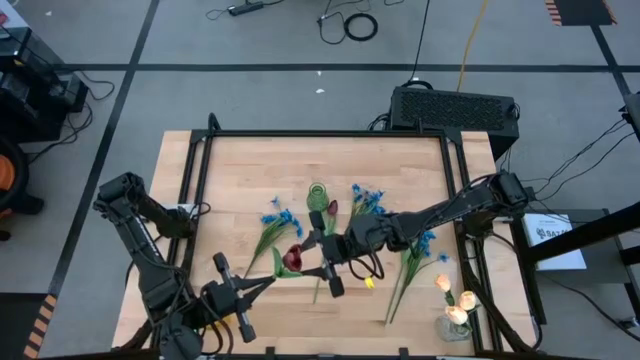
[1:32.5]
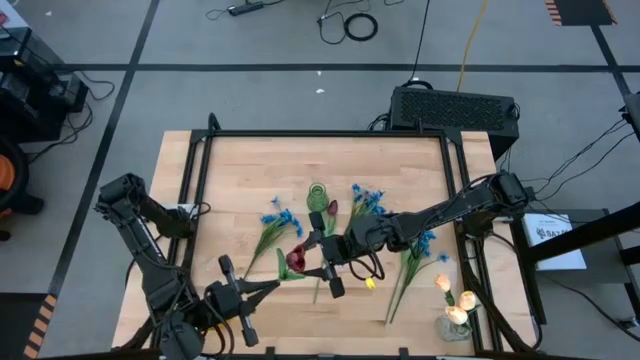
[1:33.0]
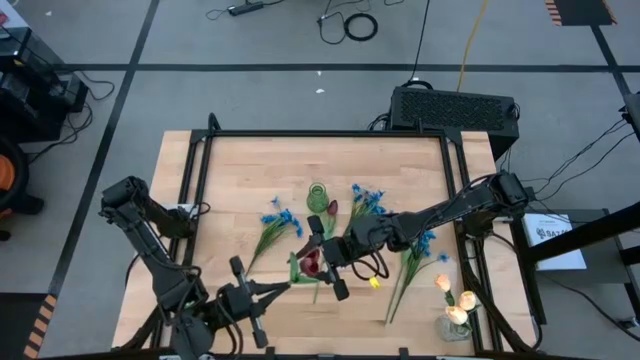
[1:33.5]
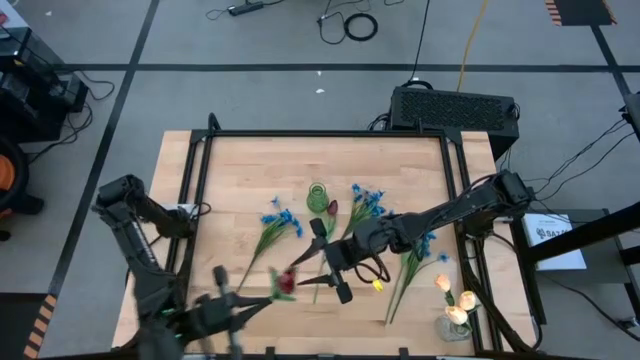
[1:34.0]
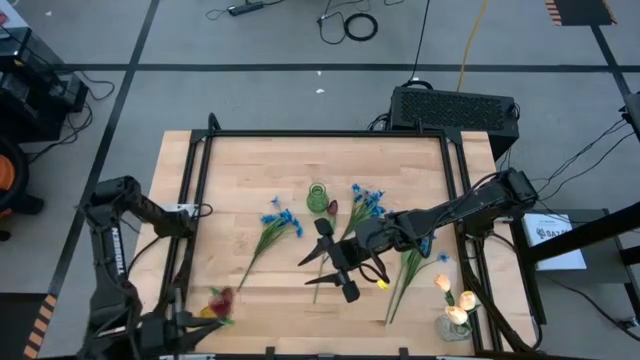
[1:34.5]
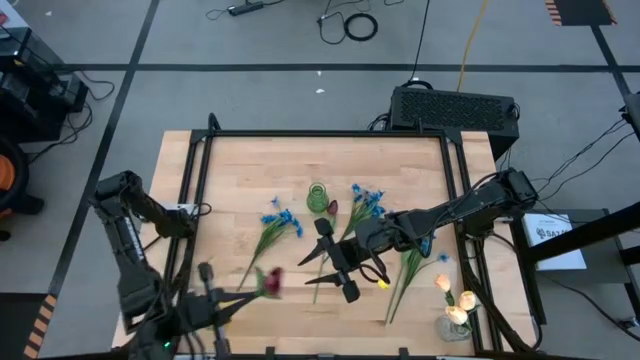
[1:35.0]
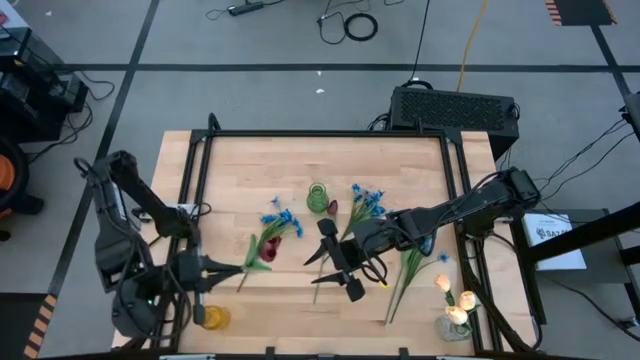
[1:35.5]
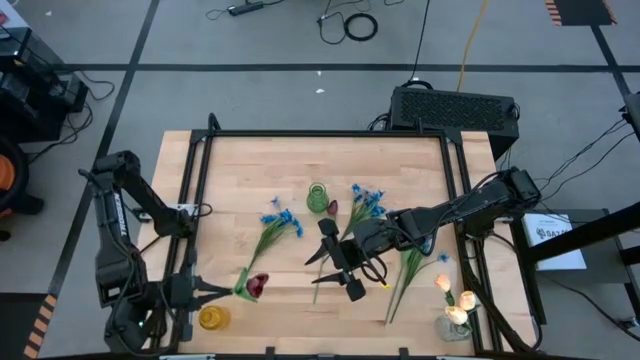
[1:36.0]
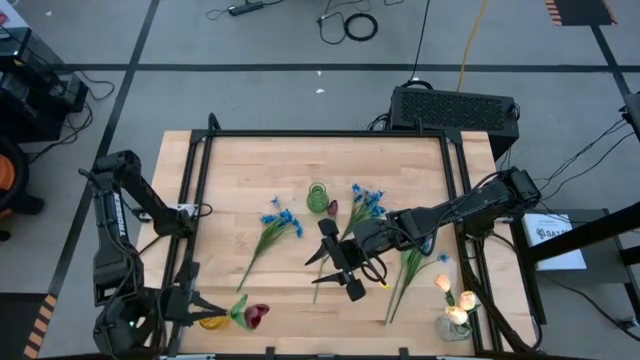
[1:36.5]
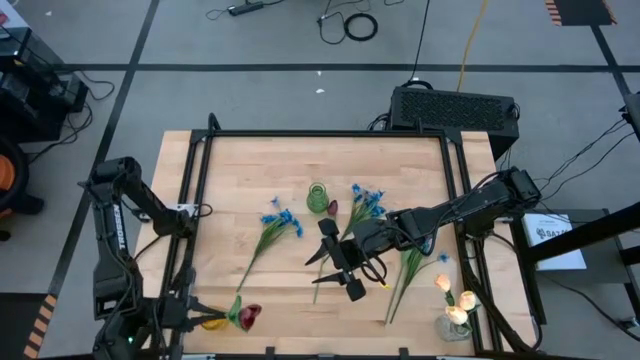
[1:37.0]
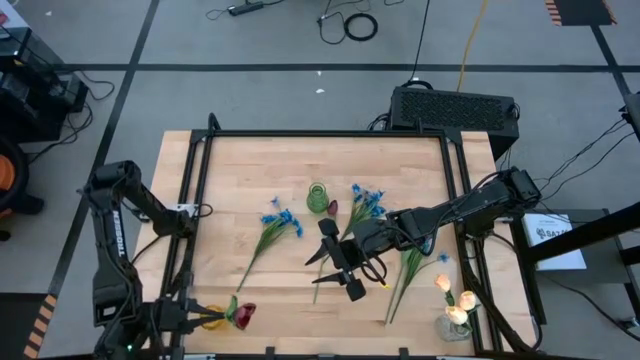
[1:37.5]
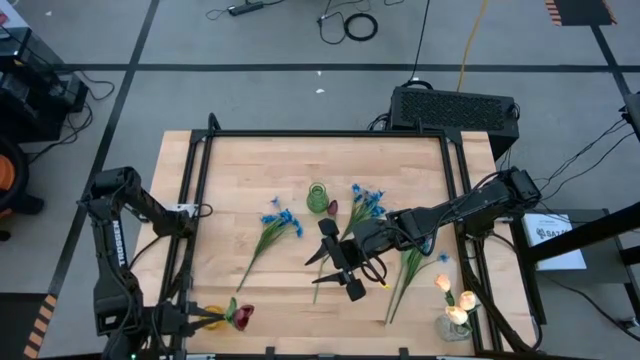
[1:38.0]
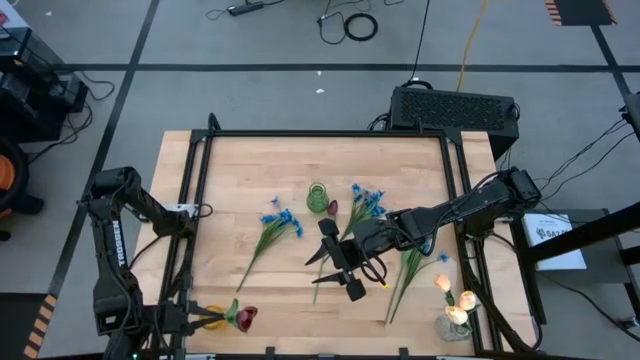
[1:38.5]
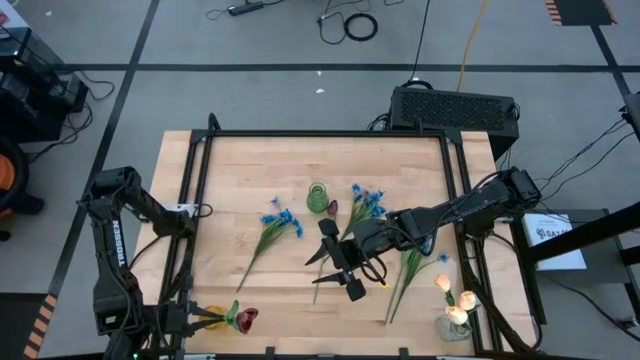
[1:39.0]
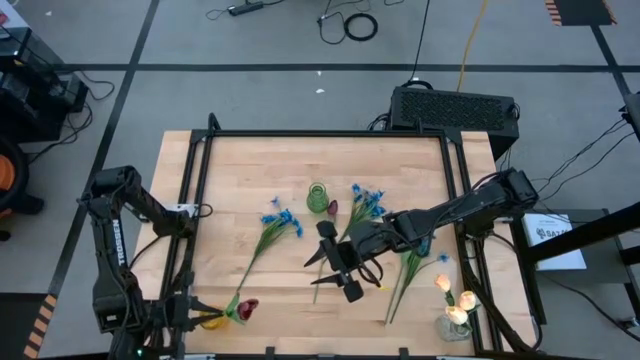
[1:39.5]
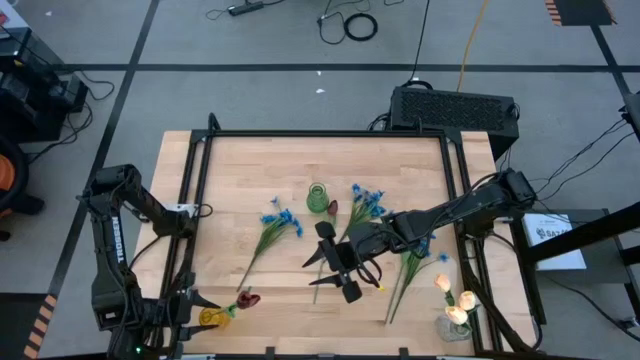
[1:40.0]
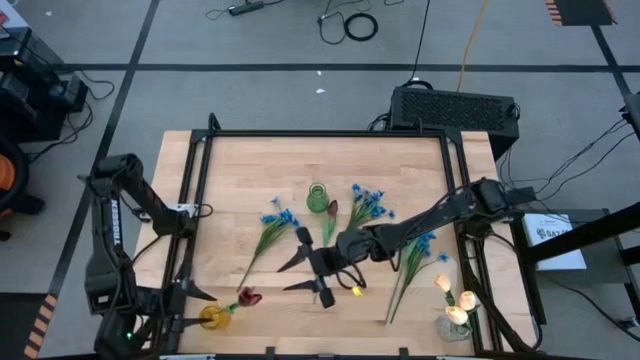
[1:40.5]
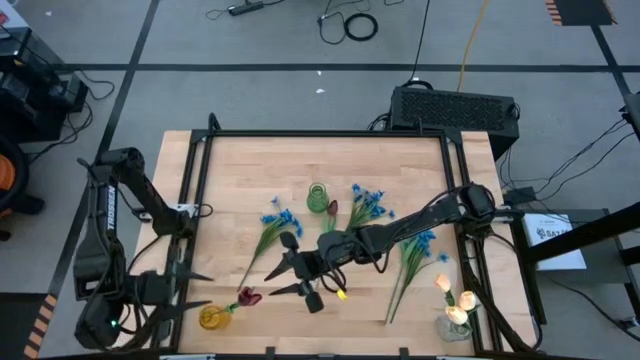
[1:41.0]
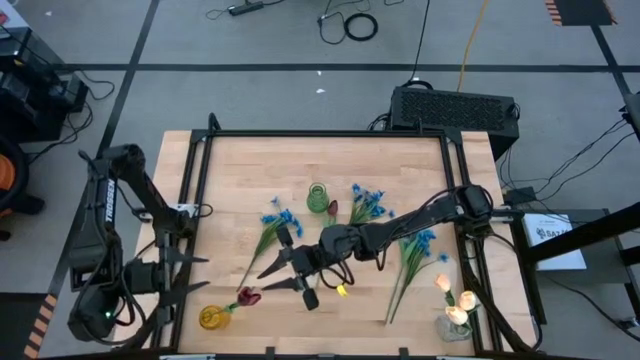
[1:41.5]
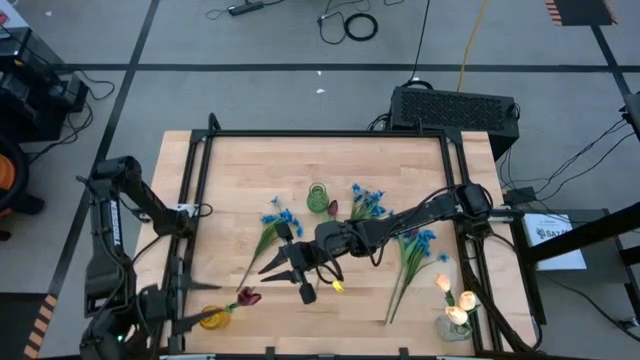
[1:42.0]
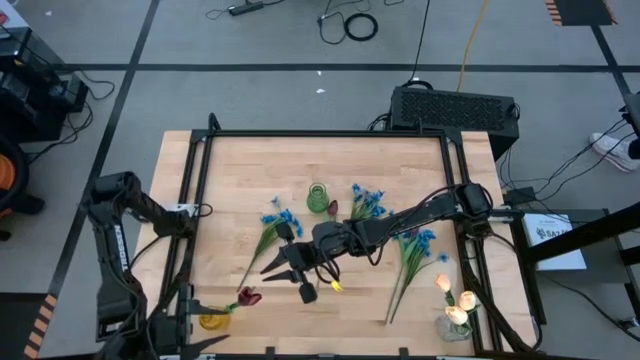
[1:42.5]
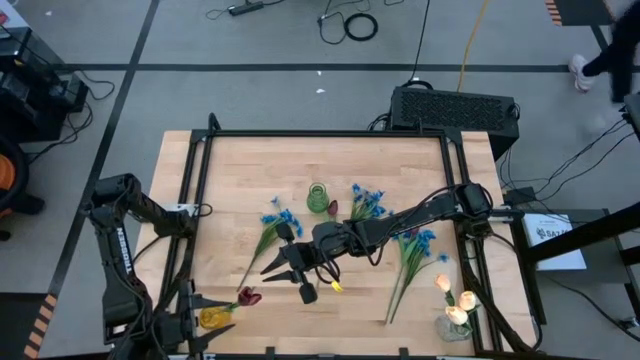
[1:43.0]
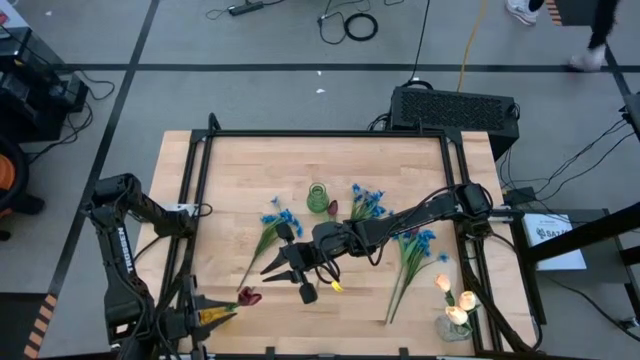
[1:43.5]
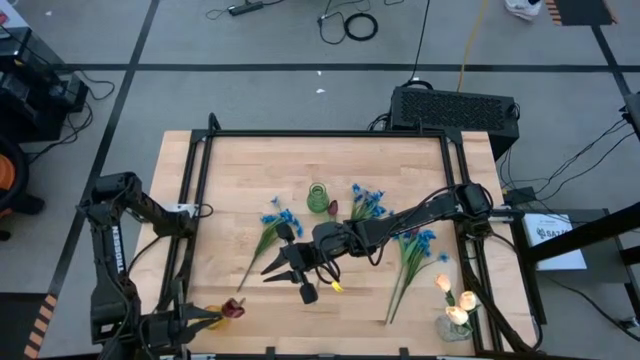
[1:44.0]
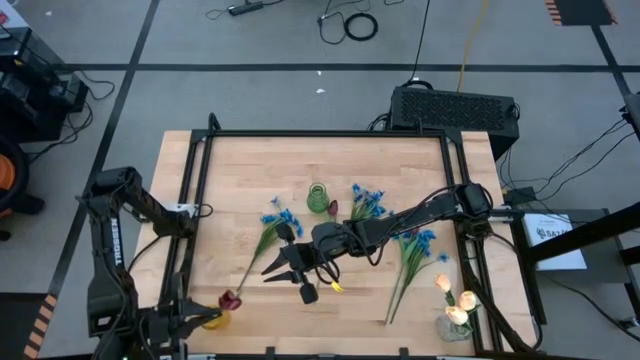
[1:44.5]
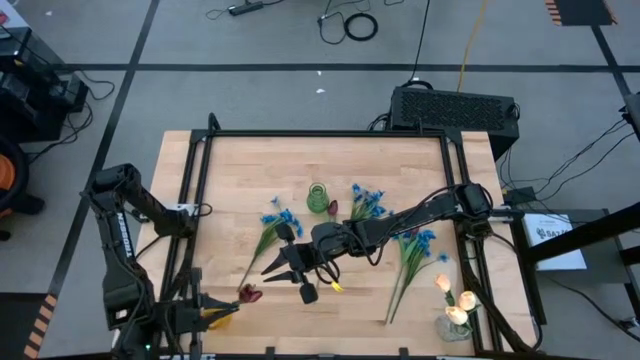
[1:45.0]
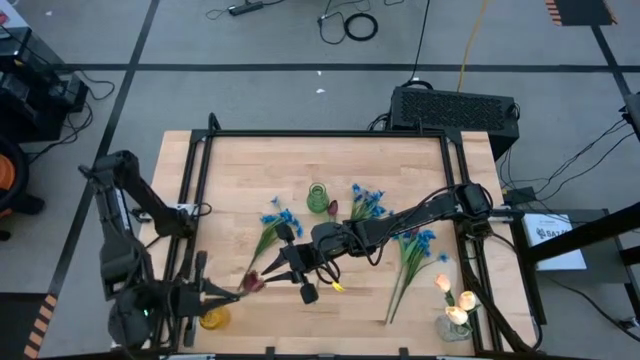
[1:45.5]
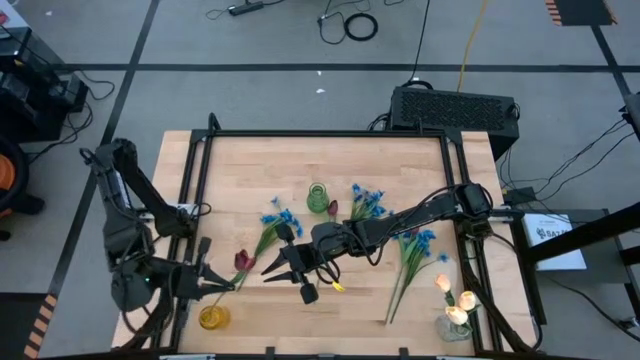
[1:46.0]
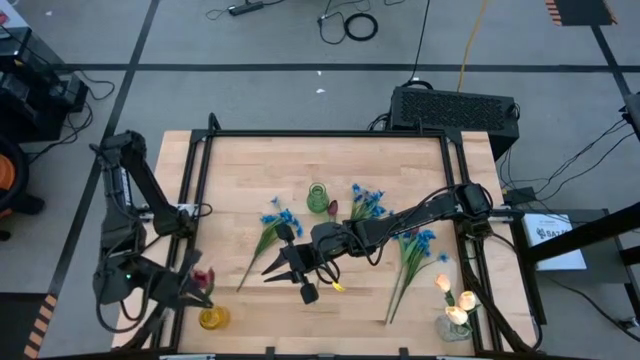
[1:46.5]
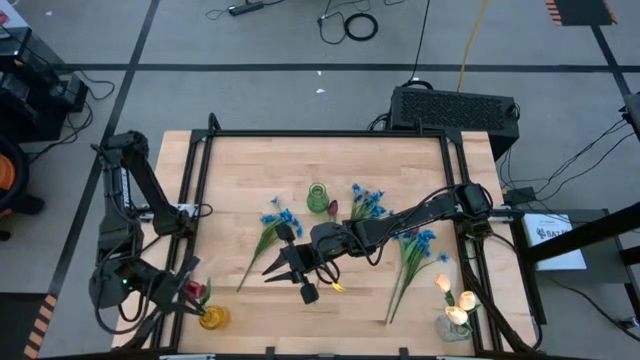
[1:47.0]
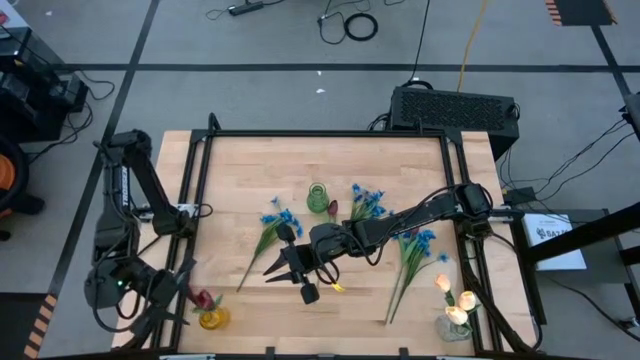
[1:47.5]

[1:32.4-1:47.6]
Task: Sort flowers into vase by color
Put the left red flower into the yellow vase

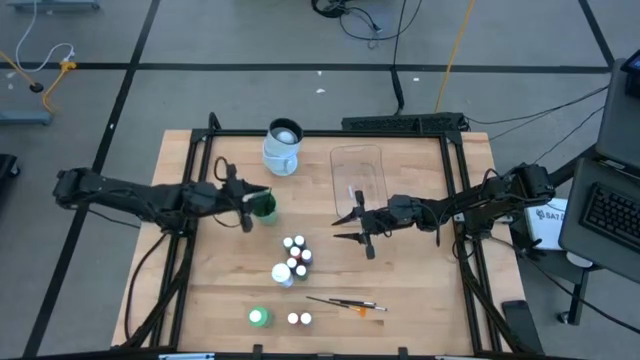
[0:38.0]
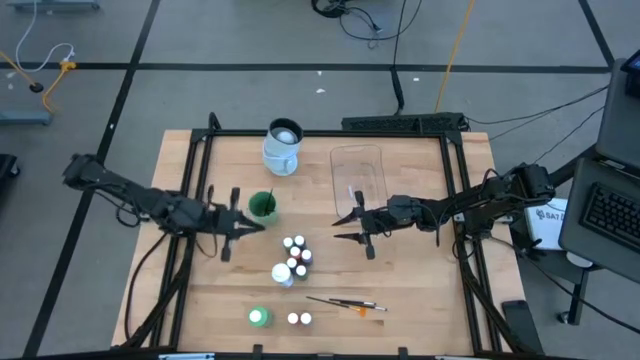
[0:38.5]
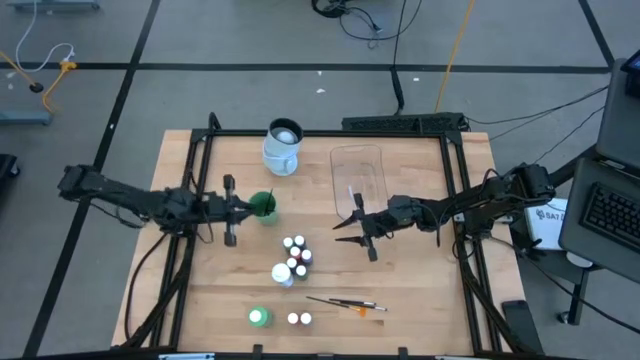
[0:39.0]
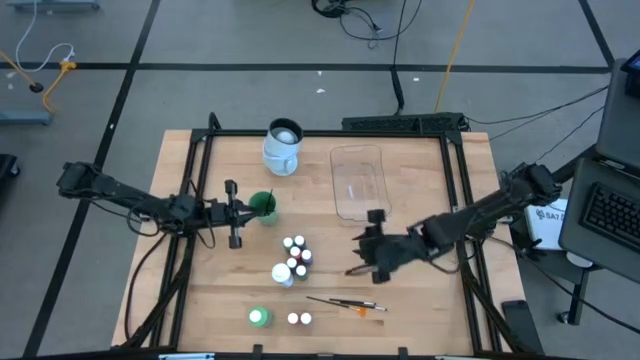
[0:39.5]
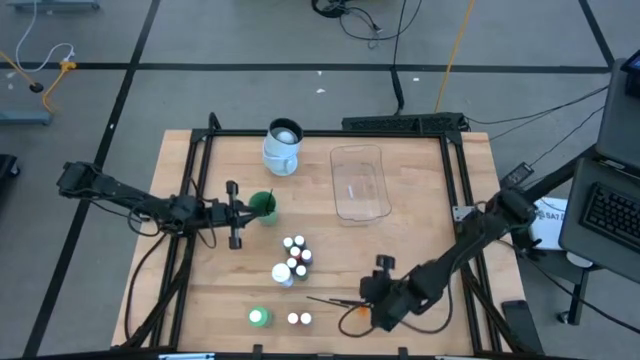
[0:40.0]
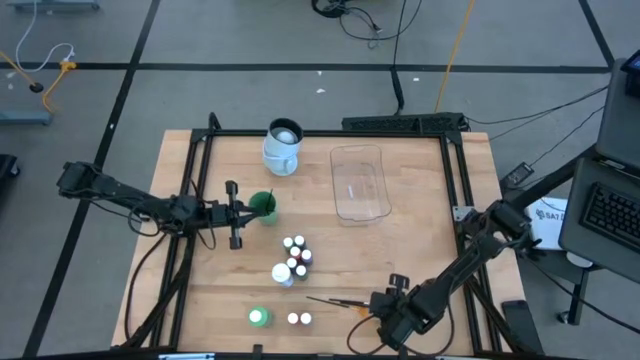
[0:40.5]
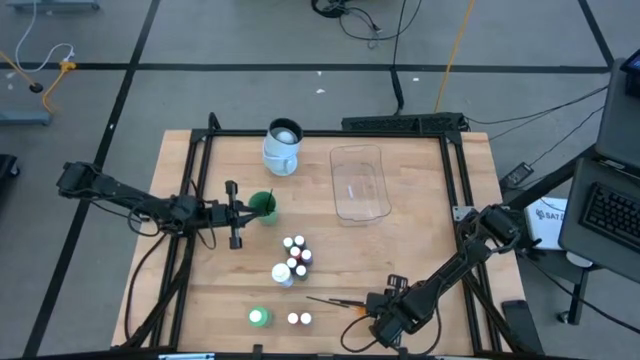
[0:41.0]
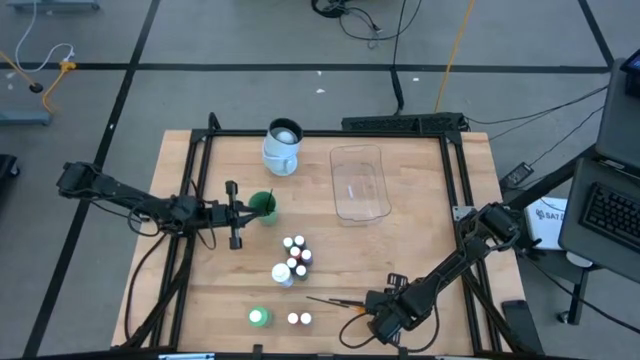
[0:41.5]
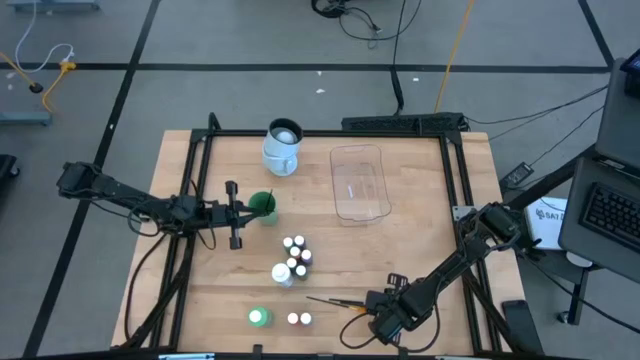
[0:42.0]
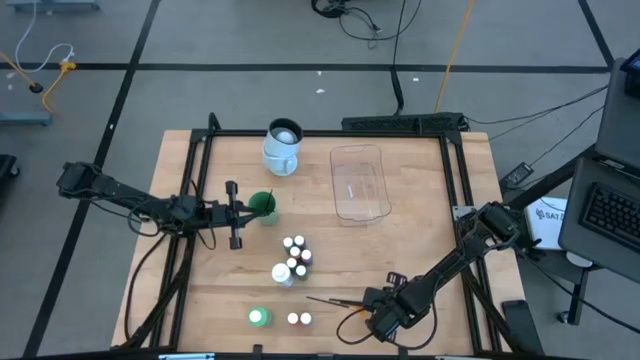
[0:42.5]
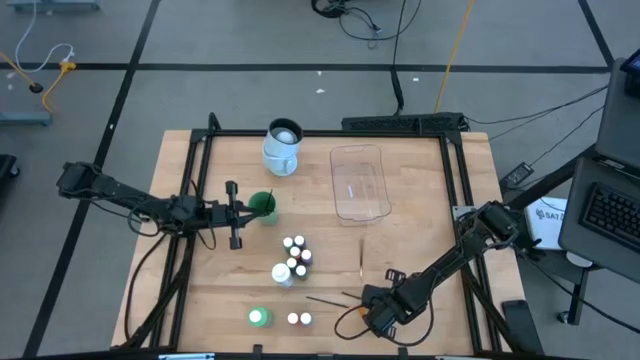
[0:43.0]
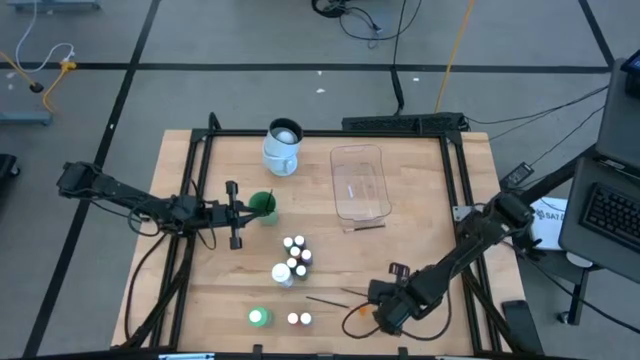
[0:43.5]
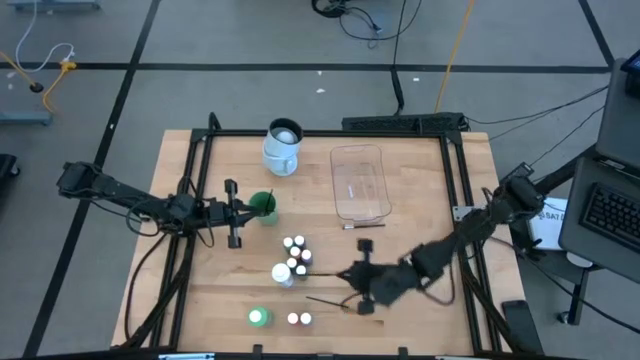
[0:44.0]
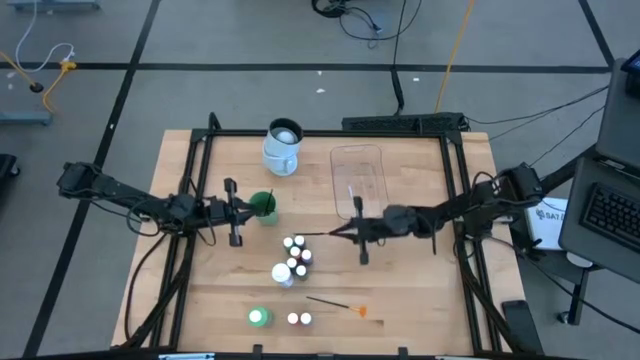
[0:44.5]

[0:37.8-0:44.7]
Task: Pick & Place Paint Supplies
Put the silver paintbrush into the green cup
